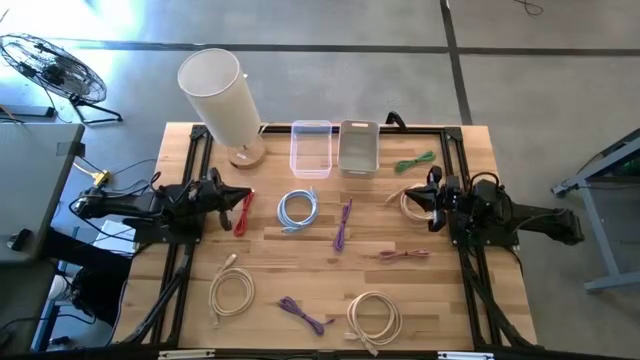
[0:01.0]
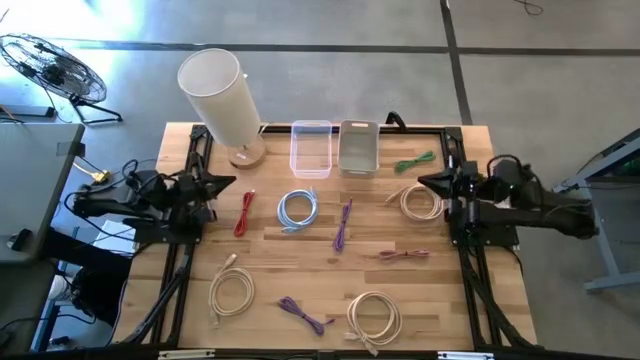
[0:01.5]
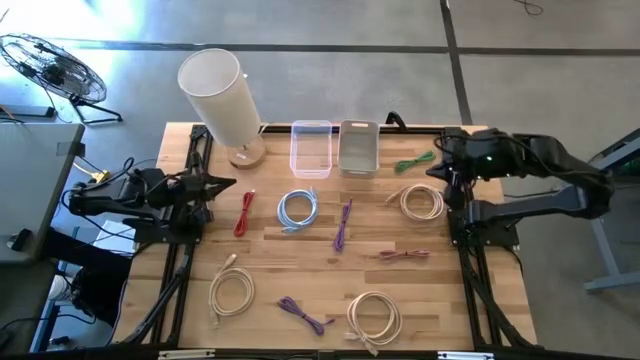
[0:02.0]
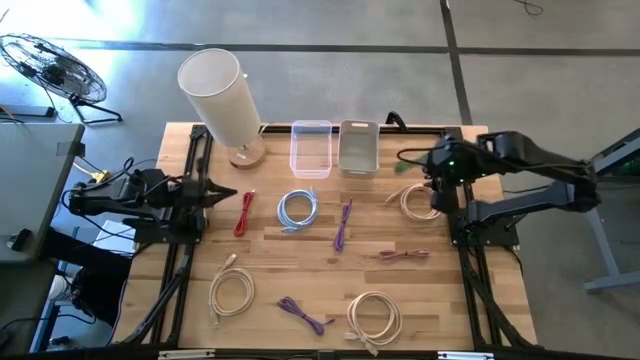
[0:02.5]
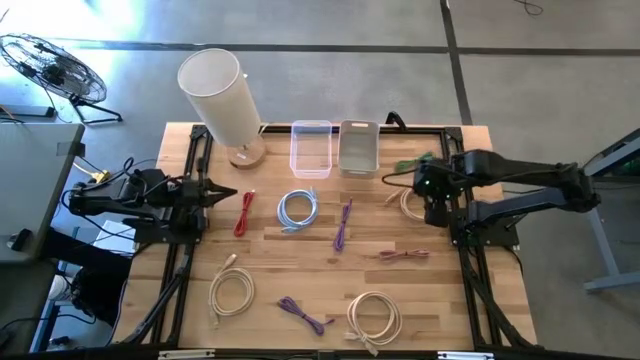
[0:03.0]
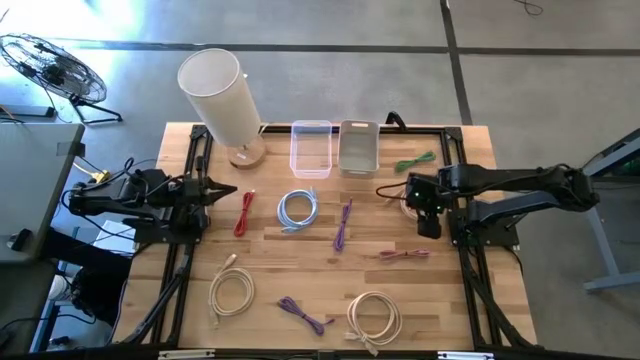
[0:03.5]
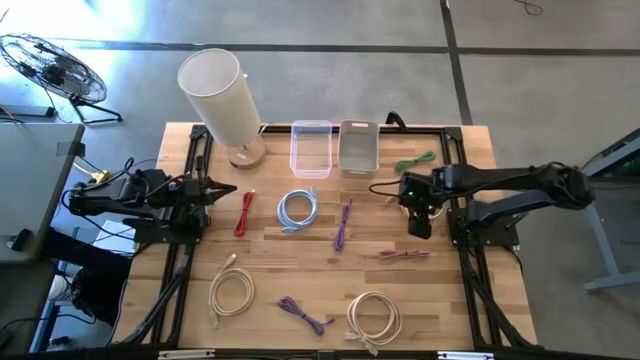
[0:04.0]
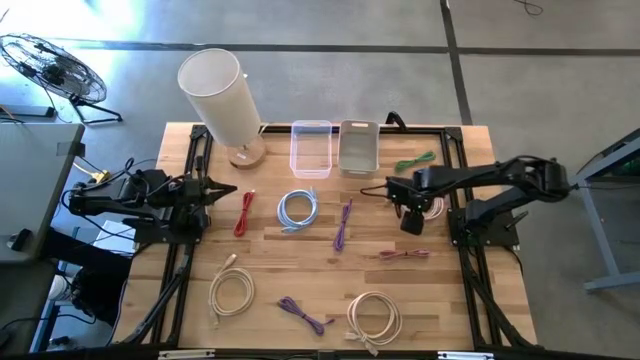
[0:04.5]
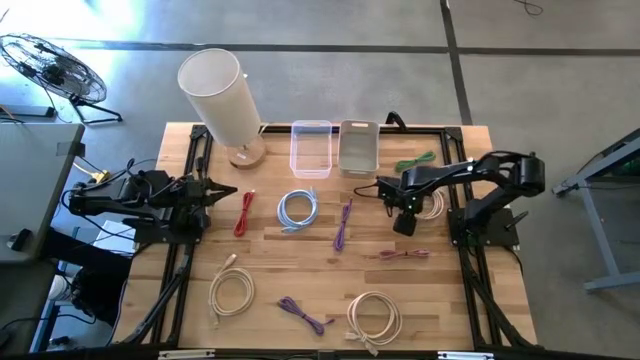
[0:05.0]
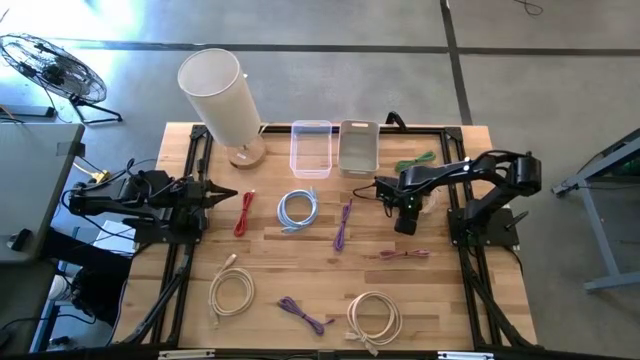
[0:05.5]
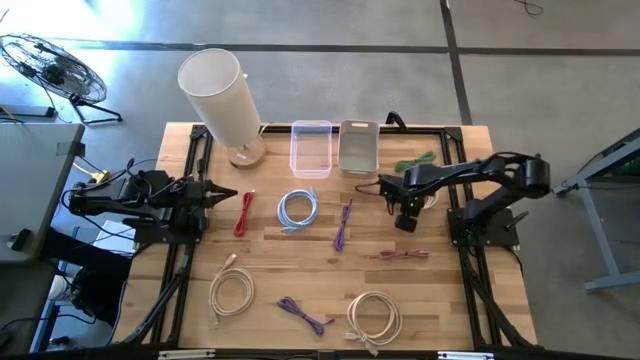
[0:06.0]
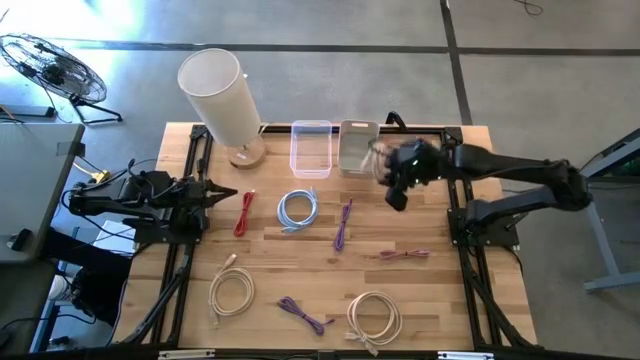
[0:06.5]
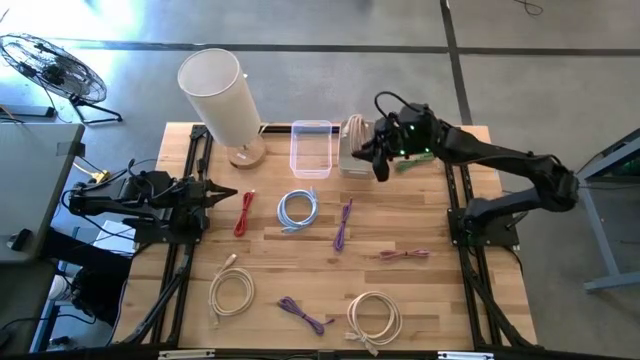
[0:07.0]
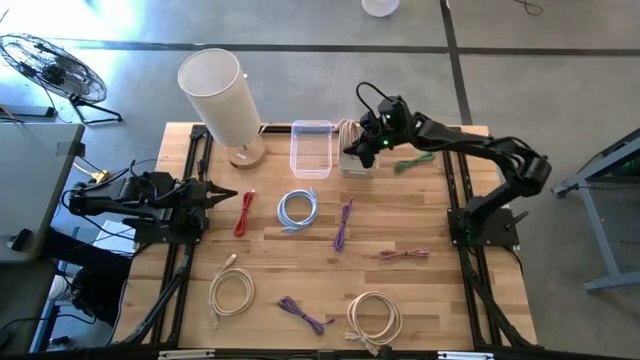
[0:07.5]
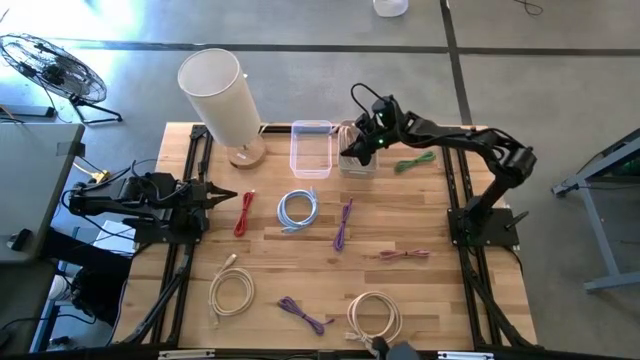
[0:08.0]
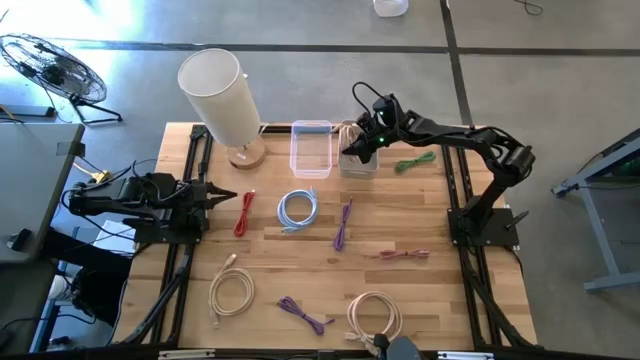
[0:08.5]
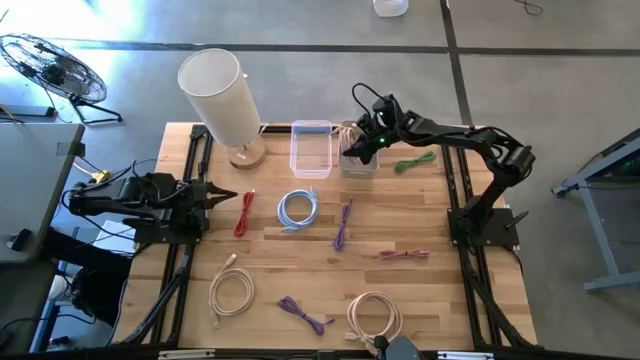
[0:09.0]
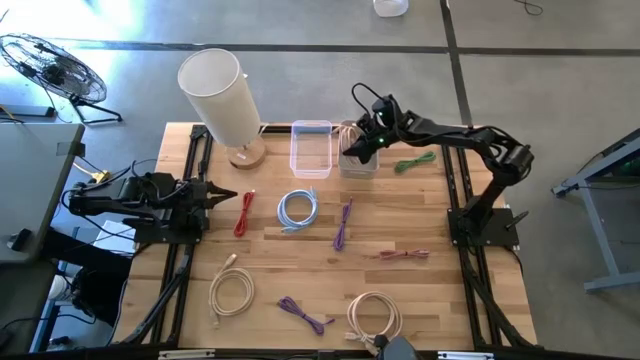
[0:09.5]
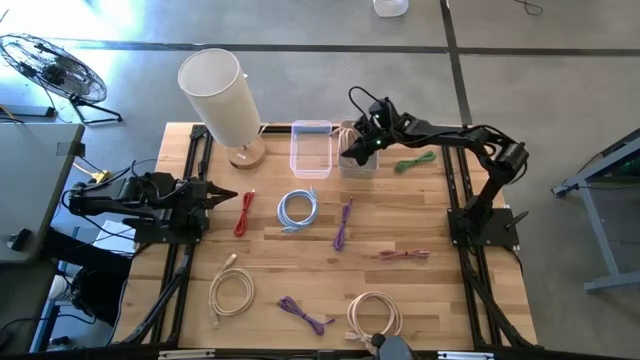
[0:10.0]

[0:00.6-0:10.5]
Task: Pick & Place USB Port
Put the top right light brown usb cable into the white bin

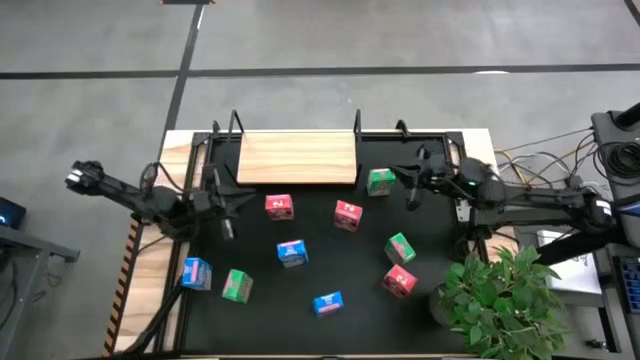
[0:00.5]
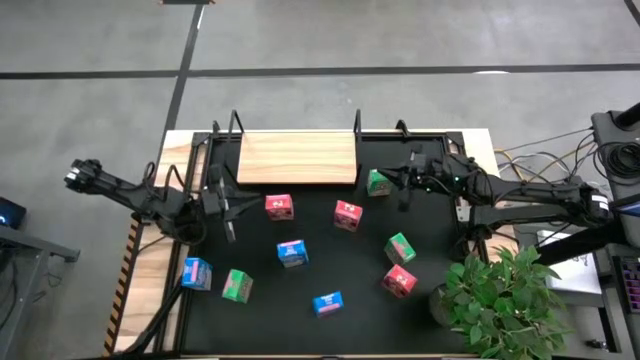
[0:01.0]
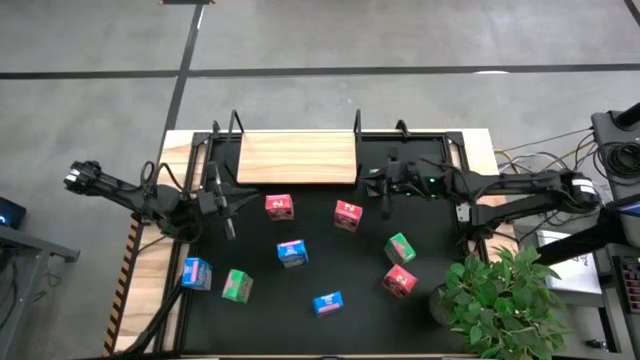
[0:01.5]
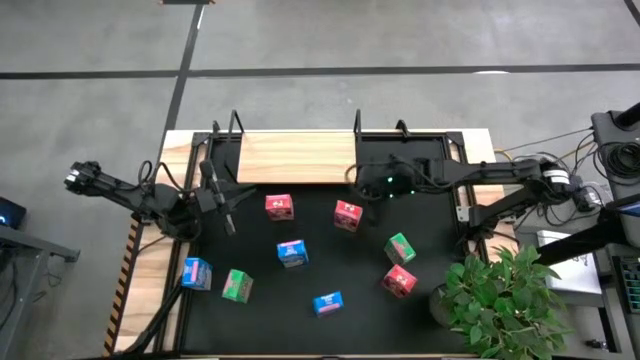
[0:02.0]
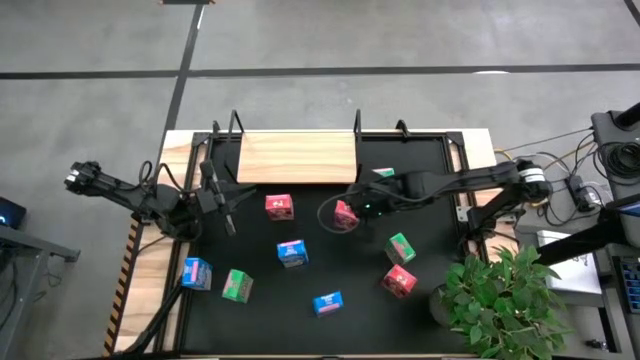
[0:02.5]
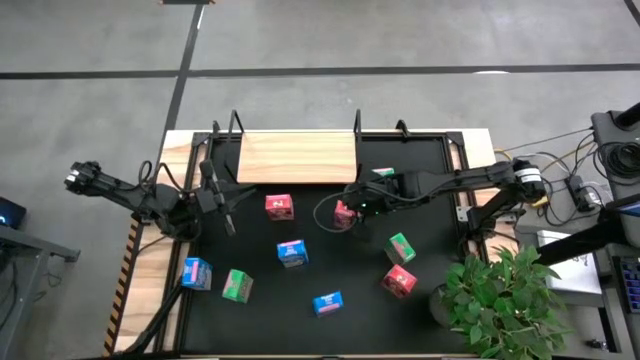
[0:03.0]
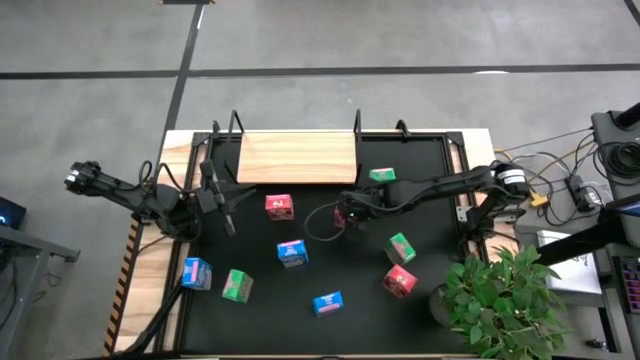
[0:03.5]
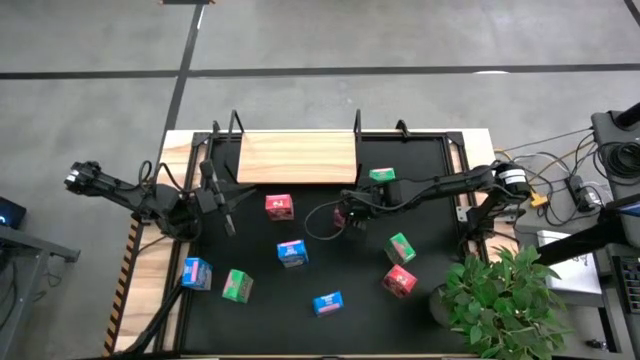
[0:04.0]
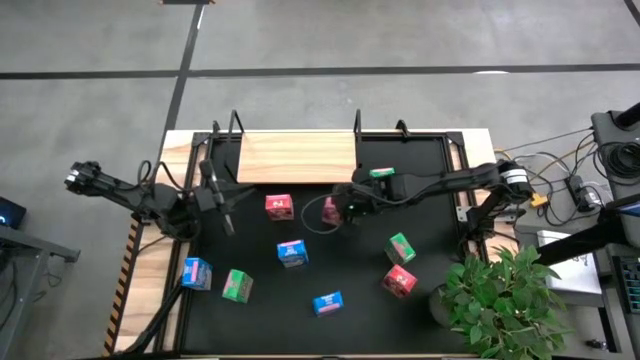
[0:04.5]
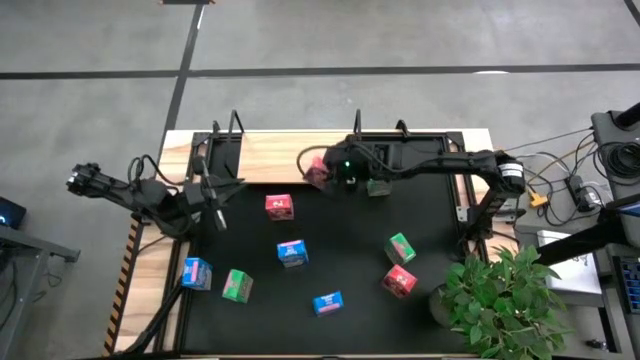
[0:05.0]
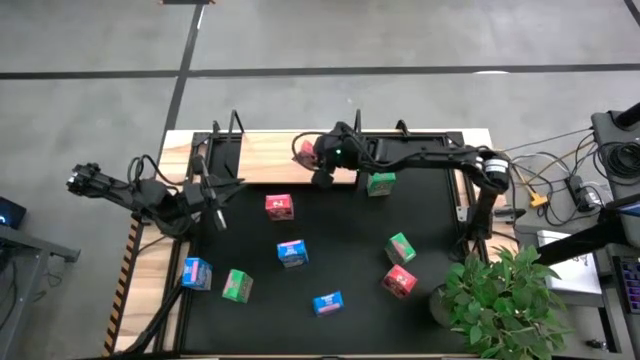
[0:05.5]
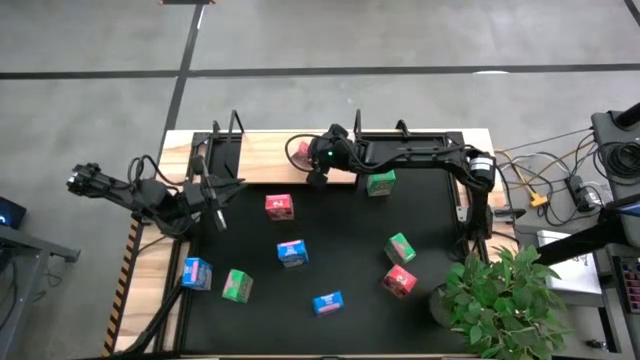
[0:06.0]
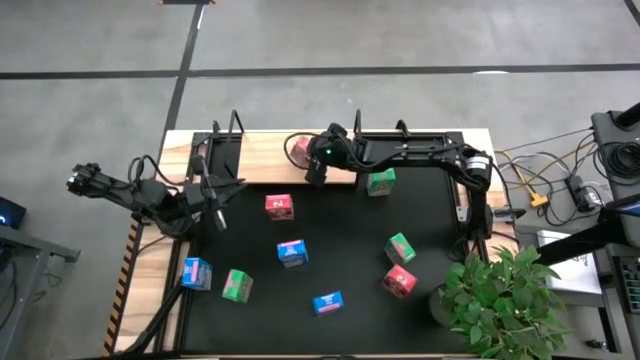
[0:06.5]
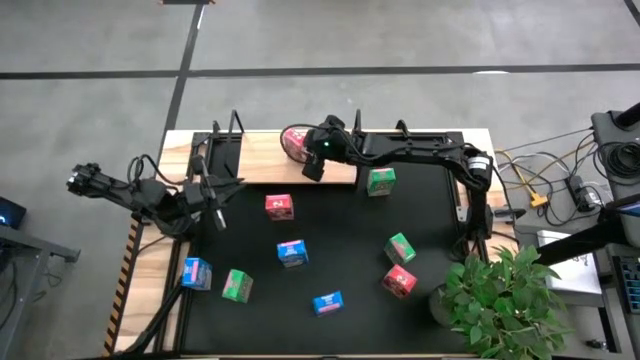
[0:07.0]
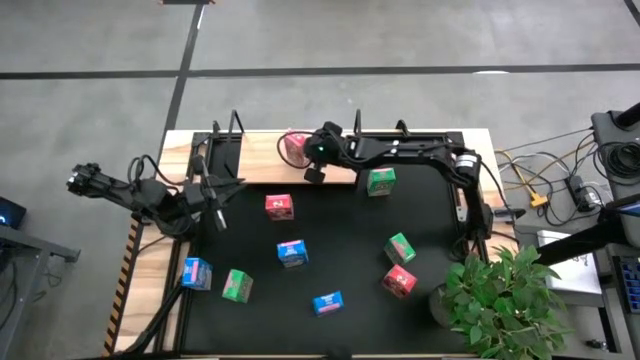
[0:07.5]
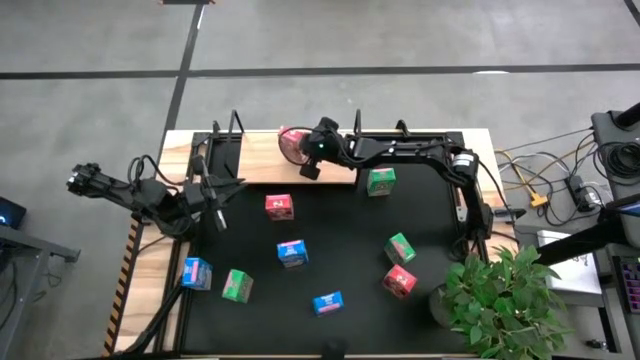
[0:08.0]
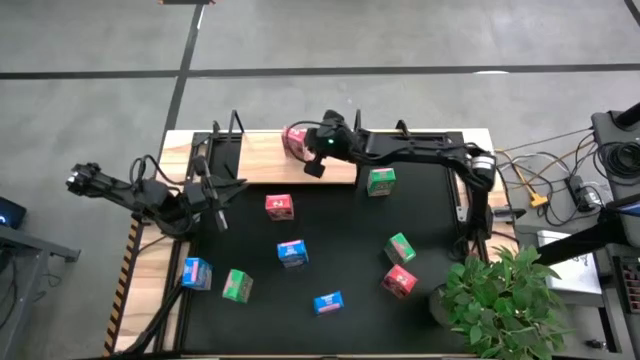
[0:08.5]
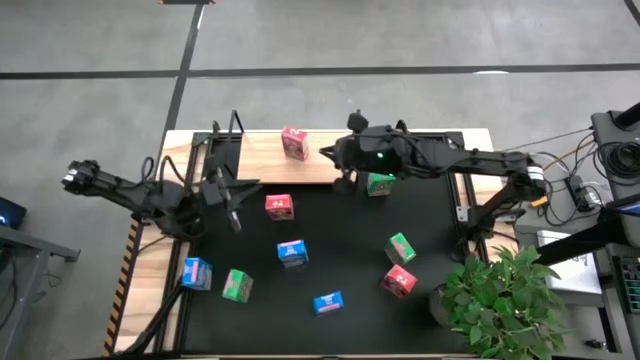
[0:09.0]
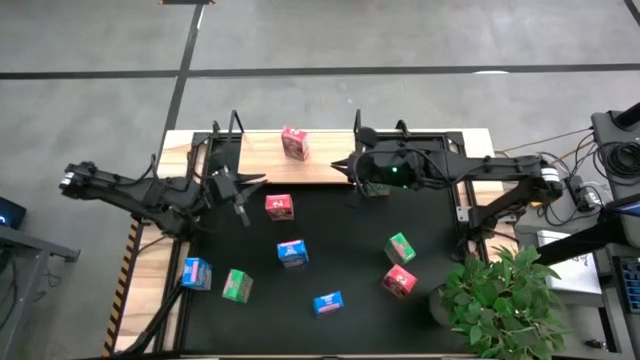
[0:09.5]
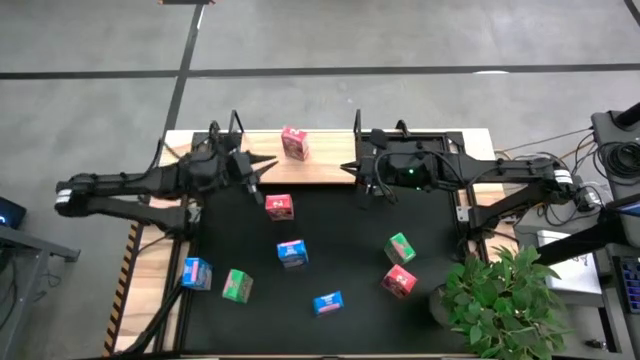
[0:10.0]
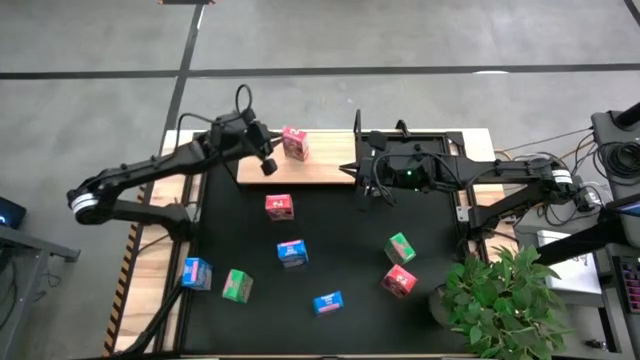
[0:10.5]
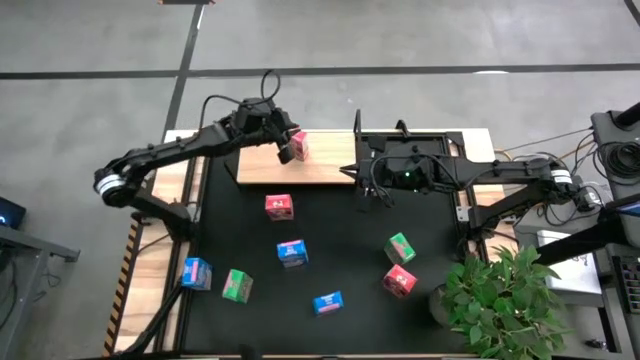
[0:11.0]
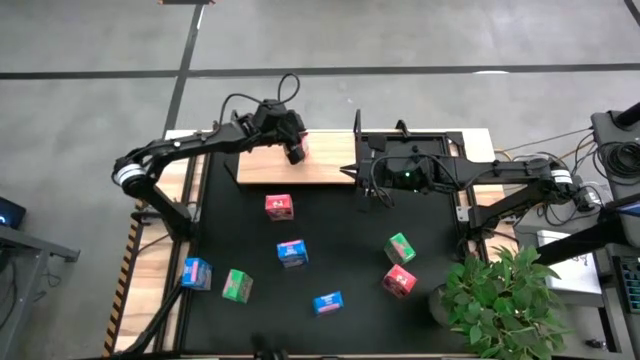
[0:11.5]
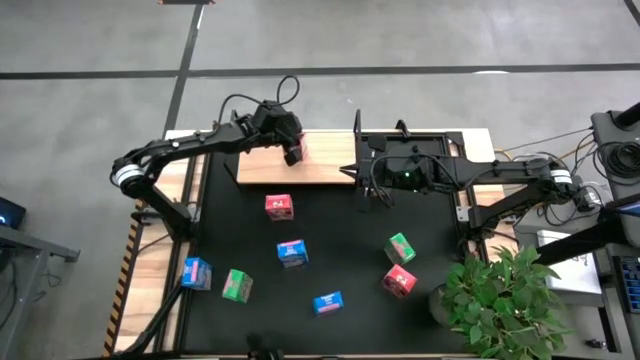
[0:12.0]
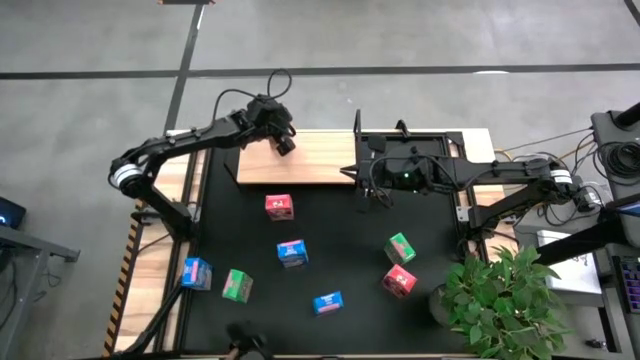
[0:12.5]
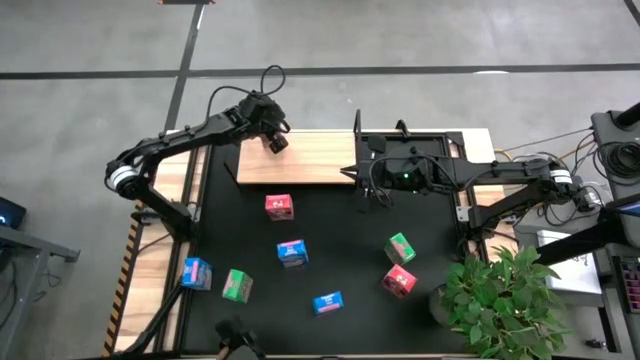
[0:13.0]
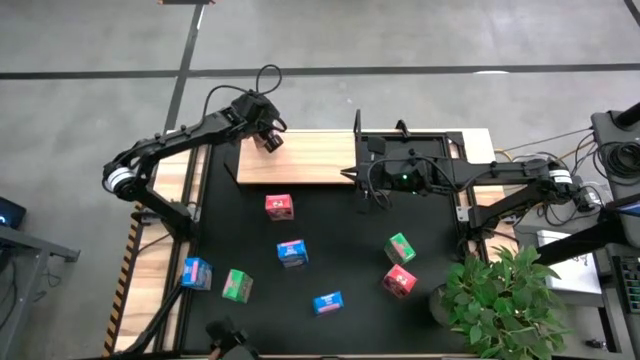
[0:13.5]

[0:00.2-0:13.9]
Task: Stack cereal on shelf
Put the top right red cereal box on the shelf
